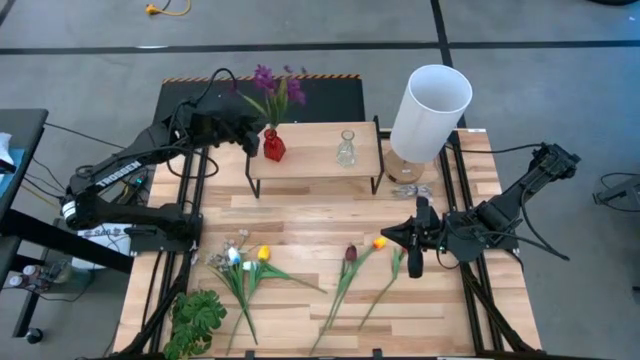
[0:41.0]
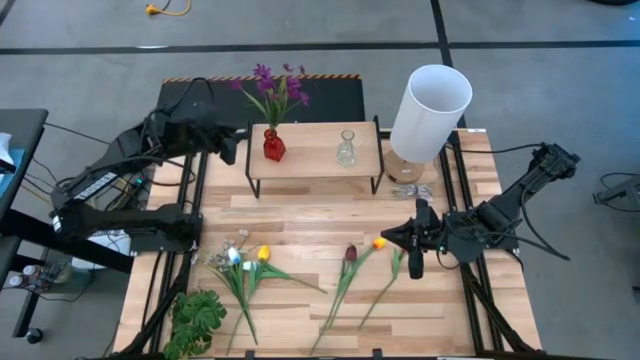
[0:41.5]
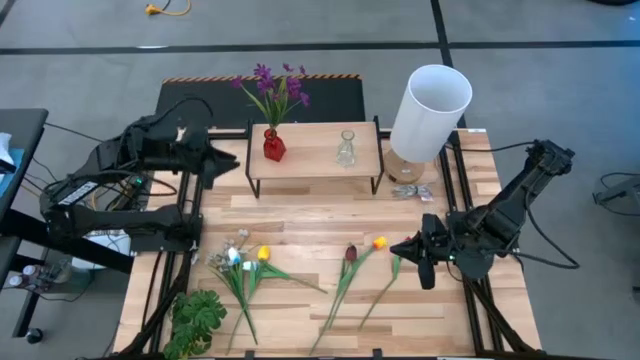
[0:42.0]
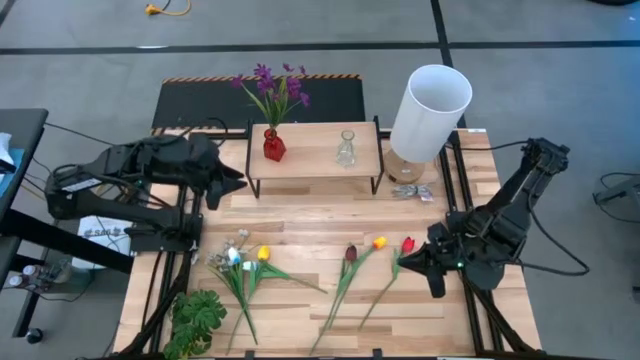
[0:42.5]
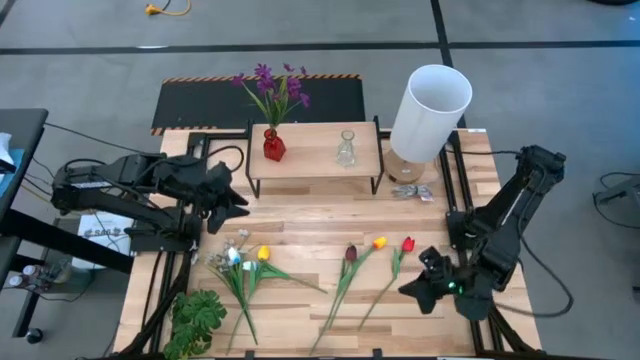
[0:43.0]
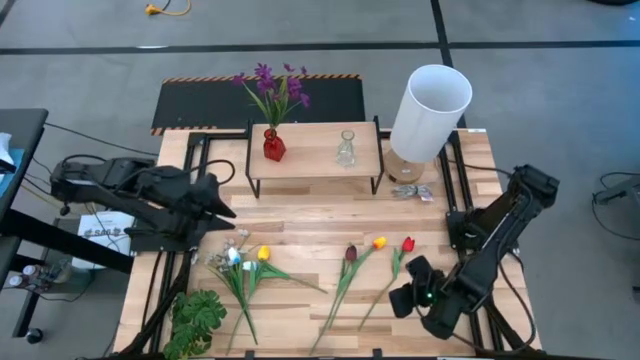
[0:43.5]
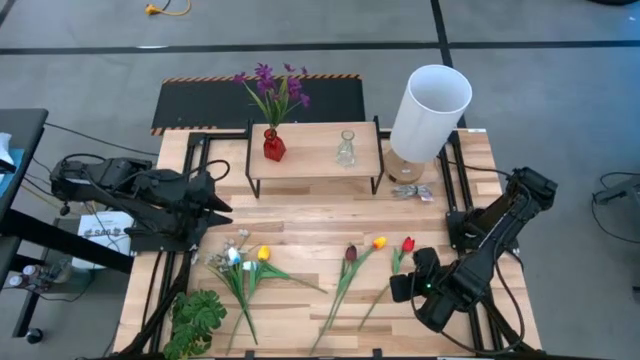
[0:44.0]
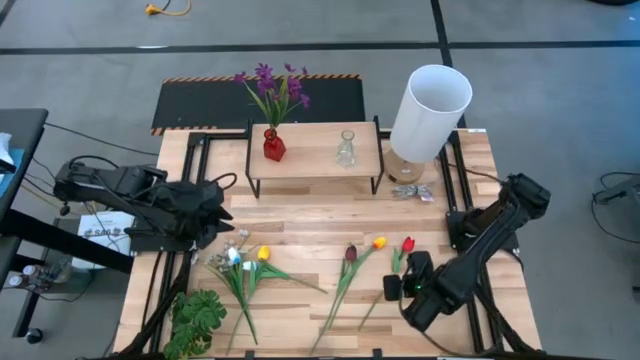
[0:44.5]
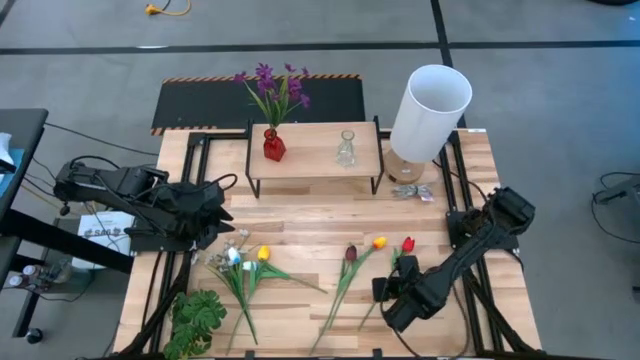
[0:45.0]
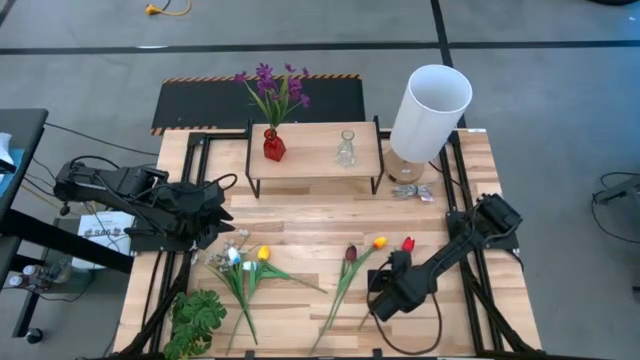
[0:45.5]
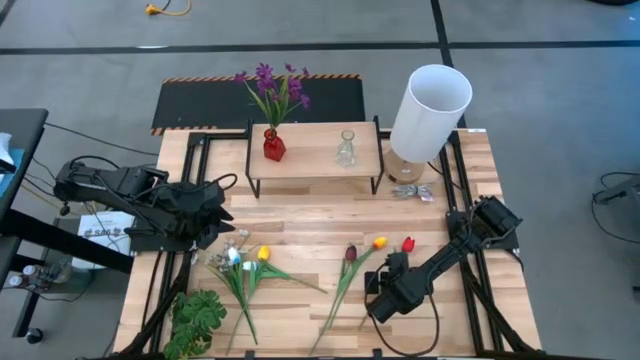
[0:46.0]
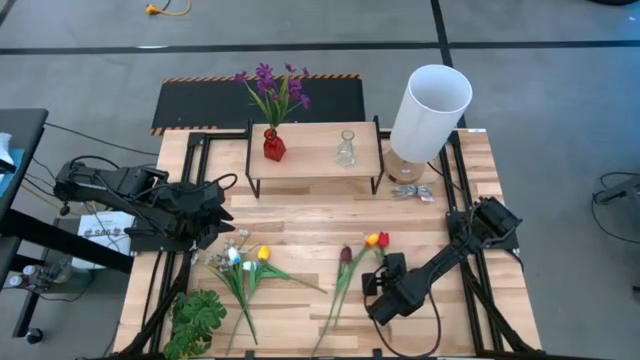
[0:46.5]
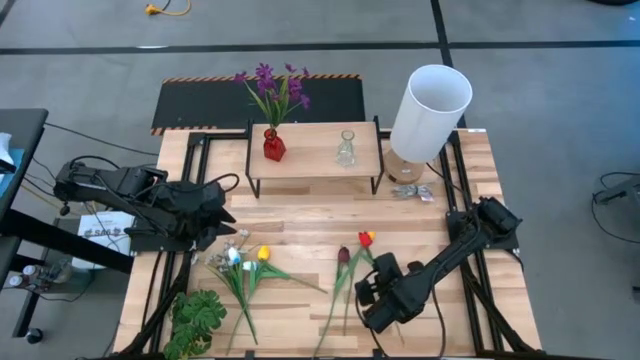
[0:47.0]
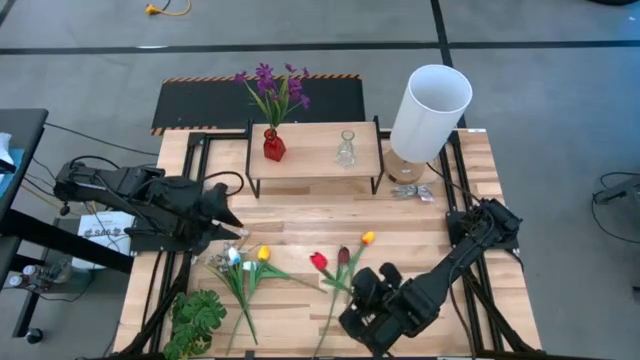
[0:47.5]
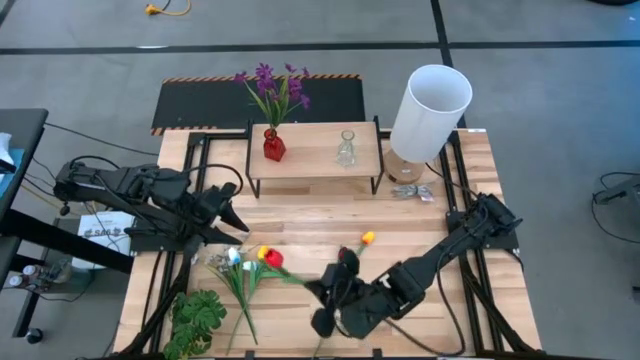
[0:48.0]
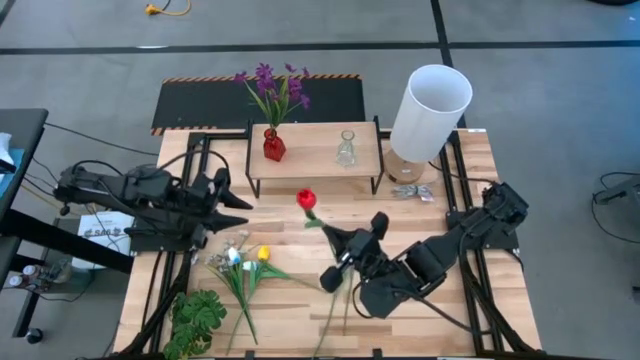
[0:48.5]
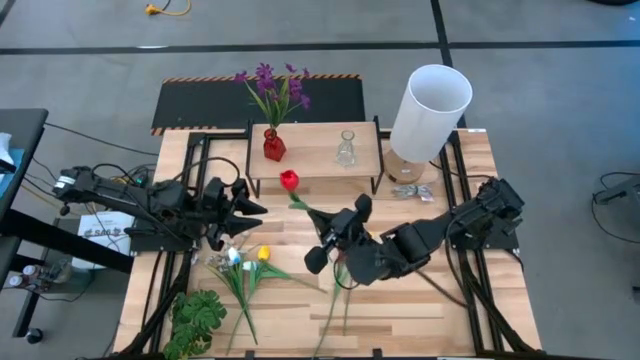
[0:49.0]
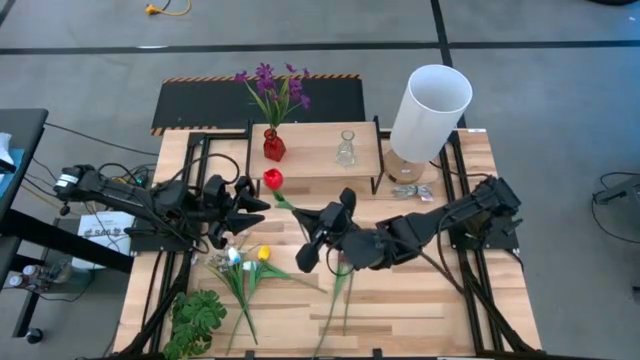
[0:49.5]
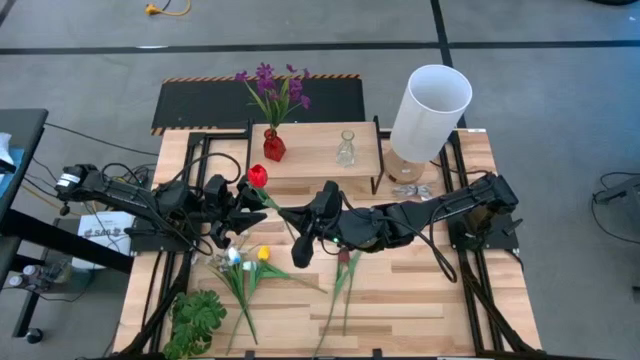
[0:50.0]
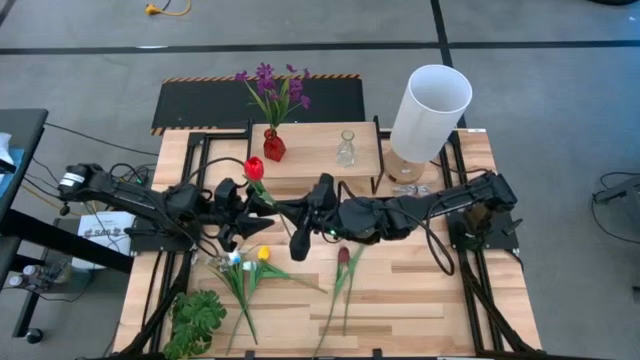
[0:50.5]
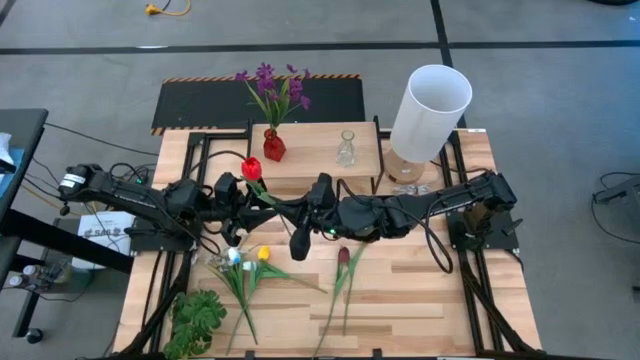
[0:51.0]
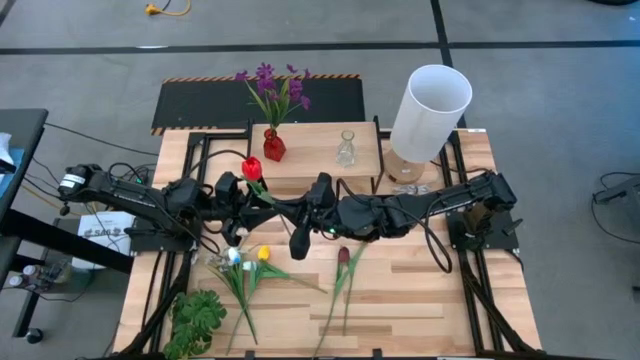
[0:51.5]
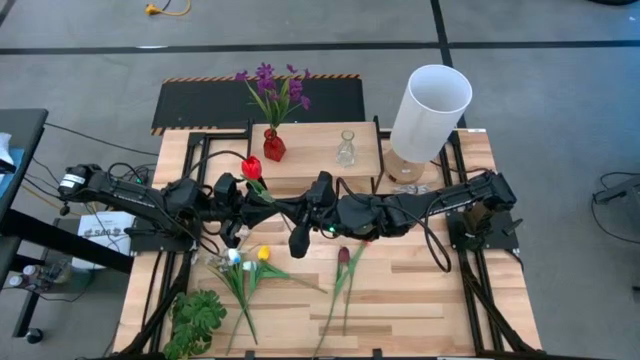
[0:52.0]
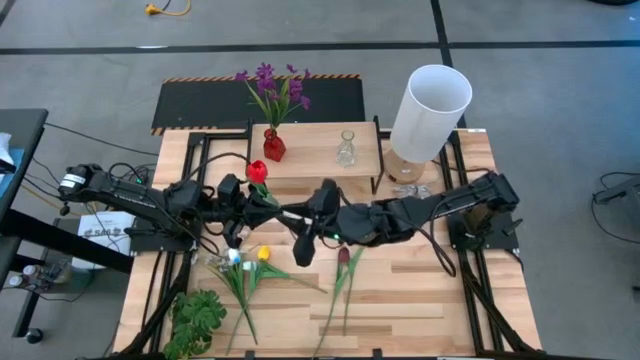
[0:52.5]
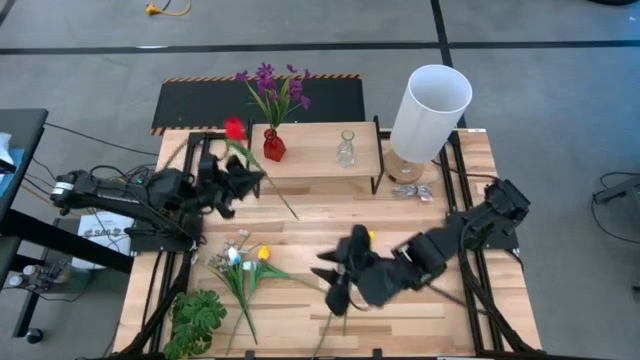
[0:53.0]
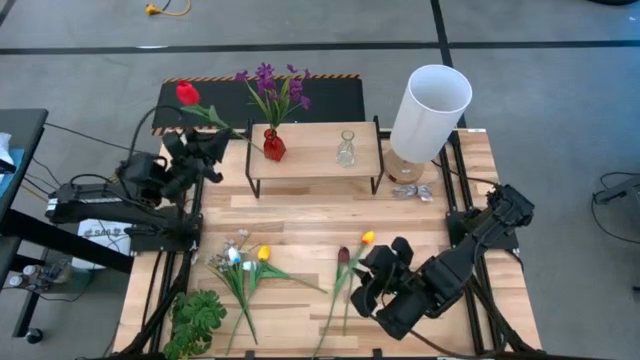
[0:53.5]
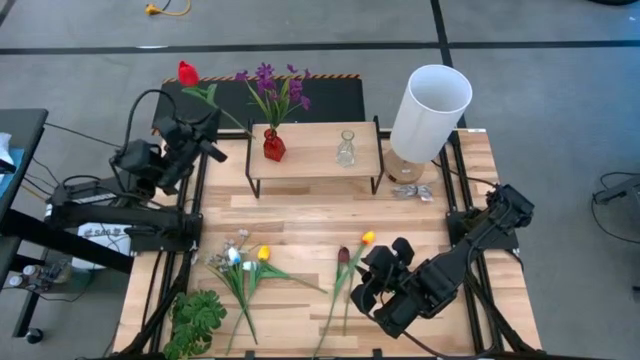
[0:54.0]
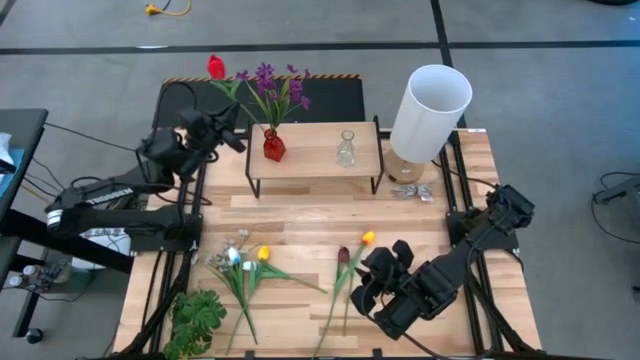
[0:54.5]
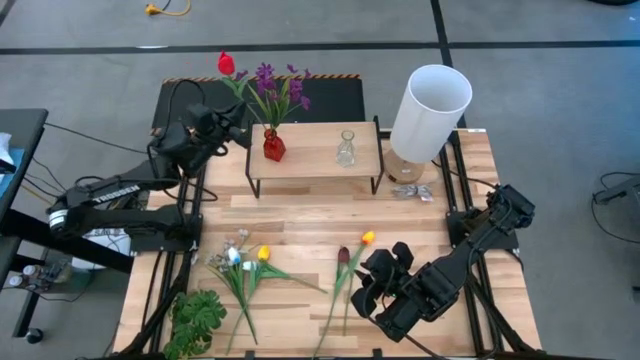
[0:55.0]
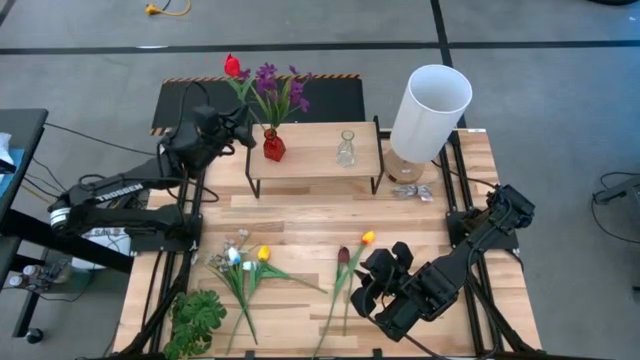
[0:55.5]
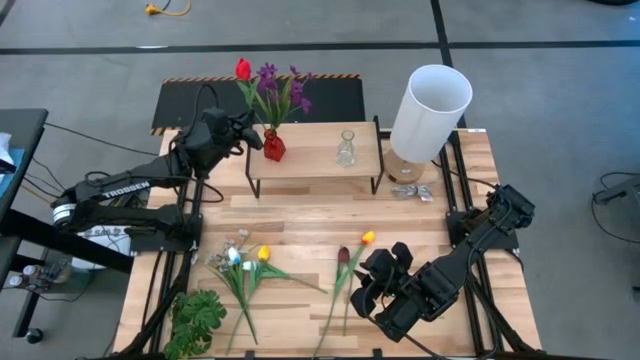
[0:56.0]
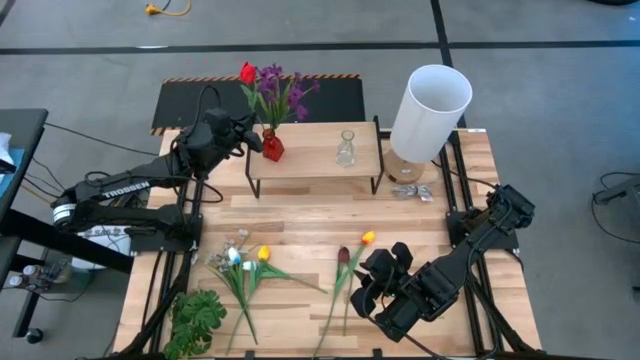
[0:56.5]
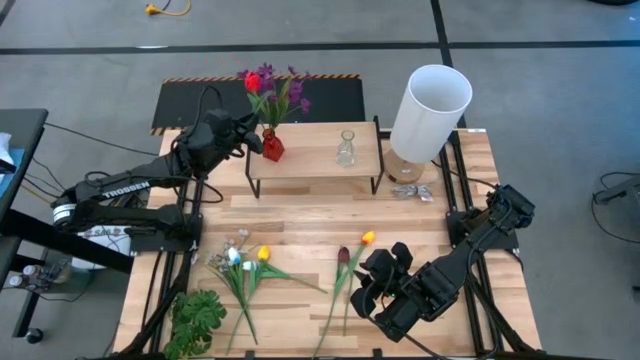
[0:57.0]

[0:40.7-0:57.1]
Task: Pick and place flowers into a vace then onto a shelf
Put the red flower into the red vase on the shelf
